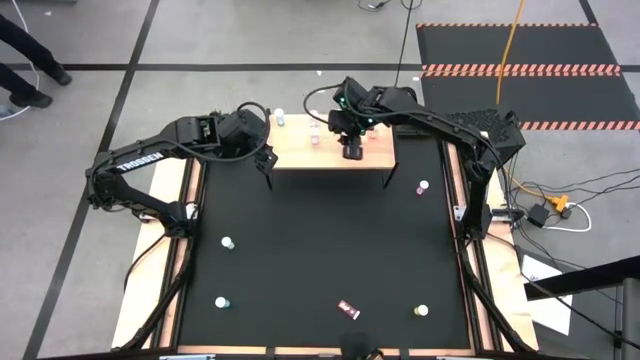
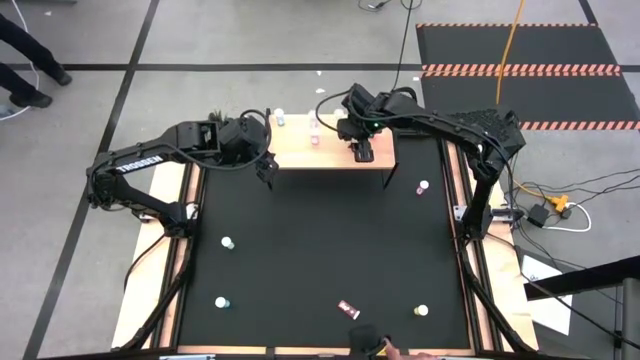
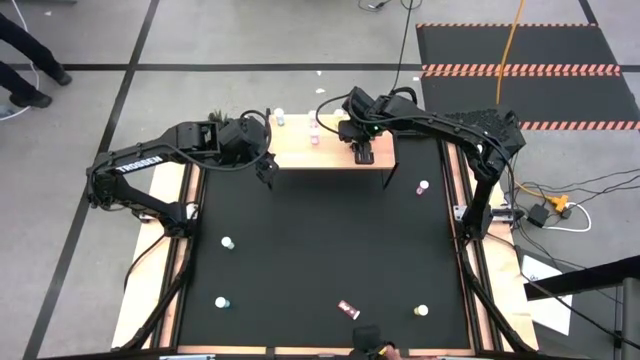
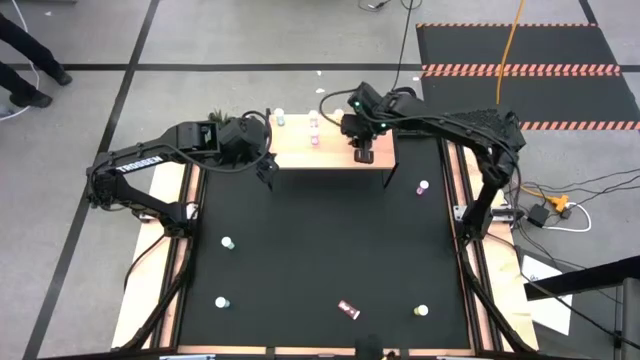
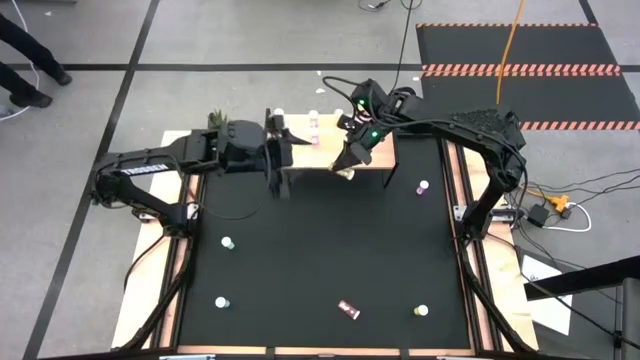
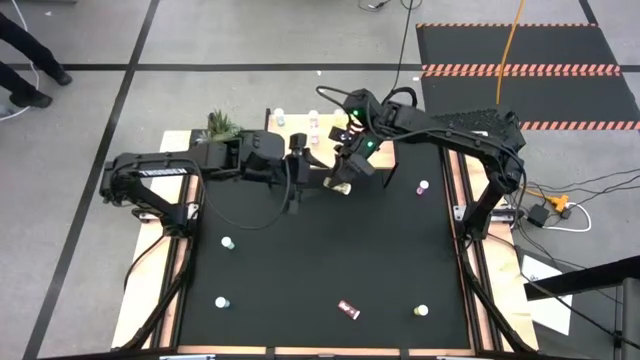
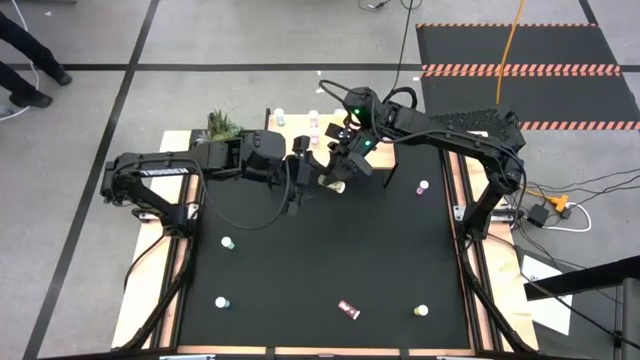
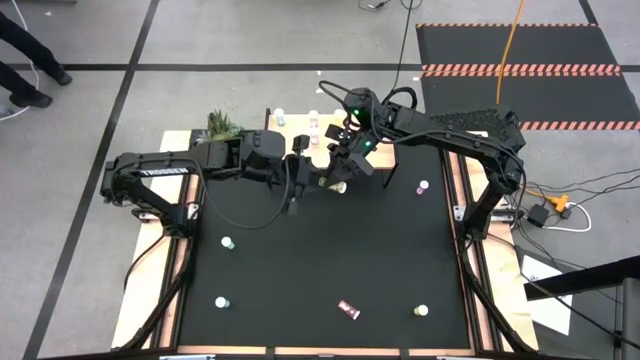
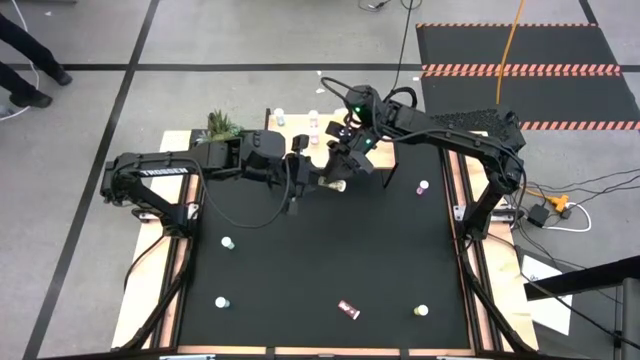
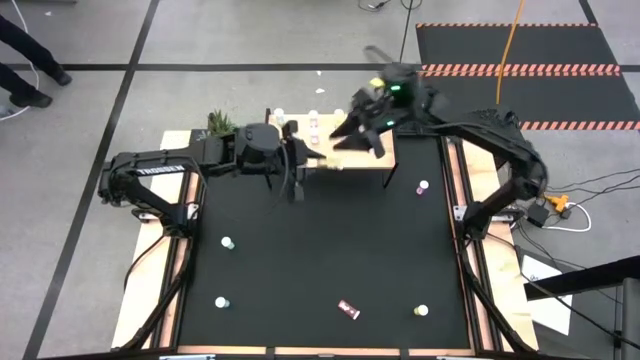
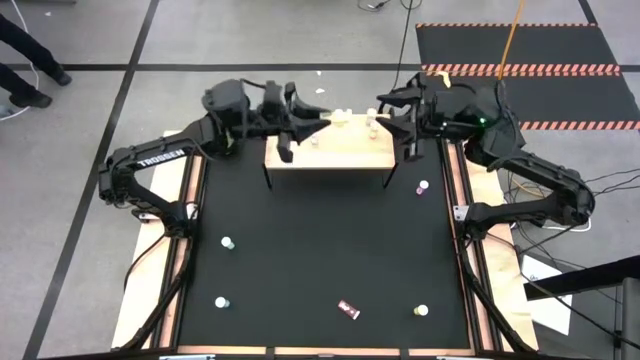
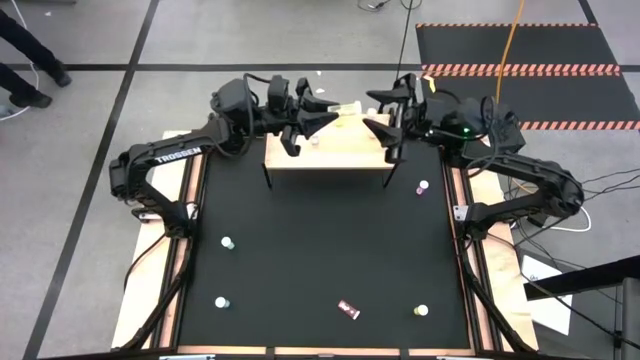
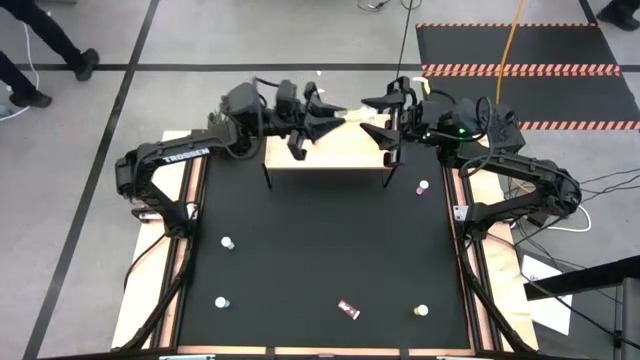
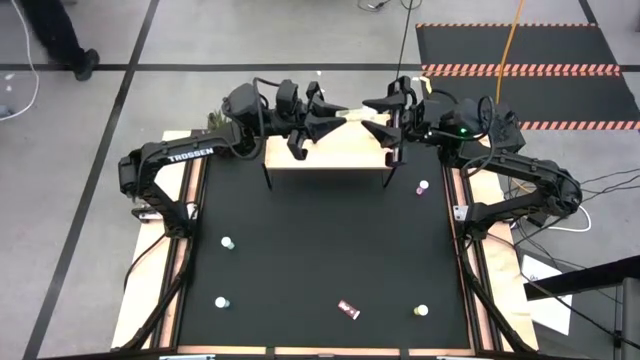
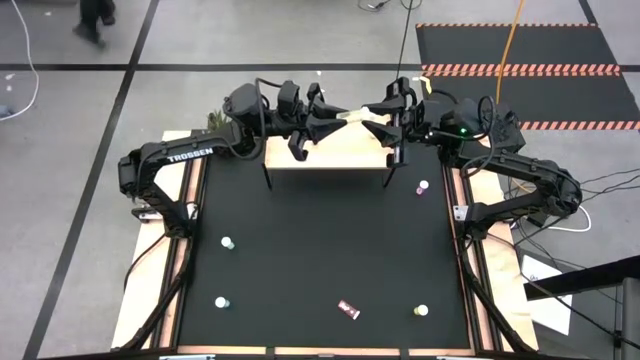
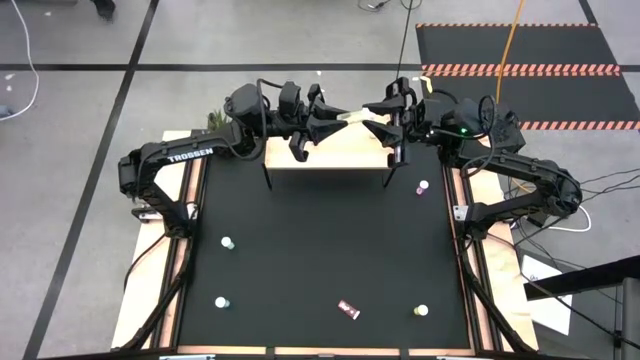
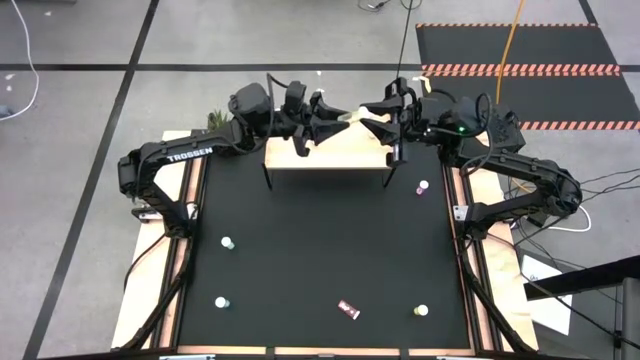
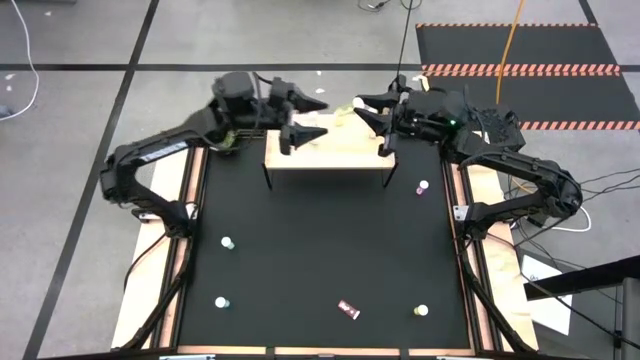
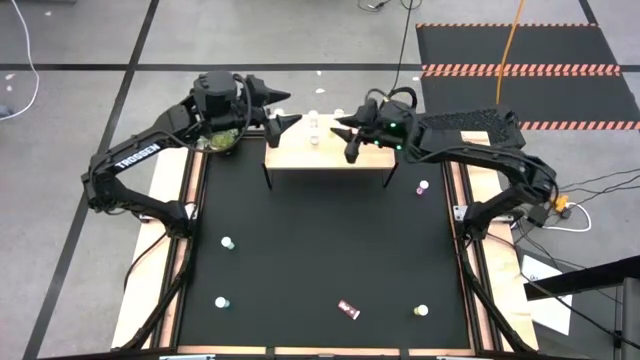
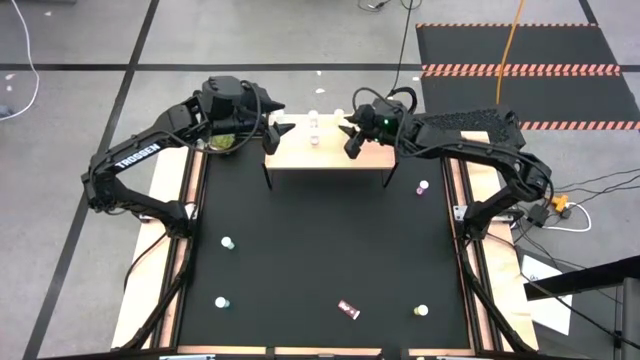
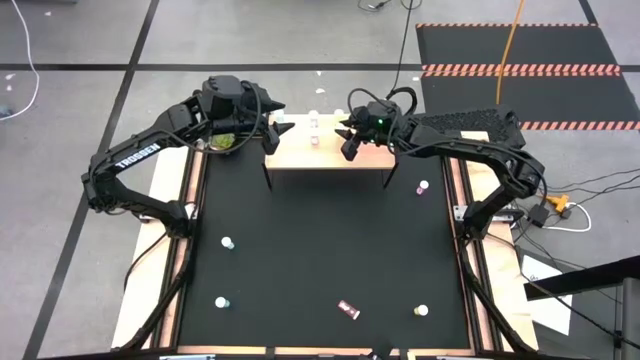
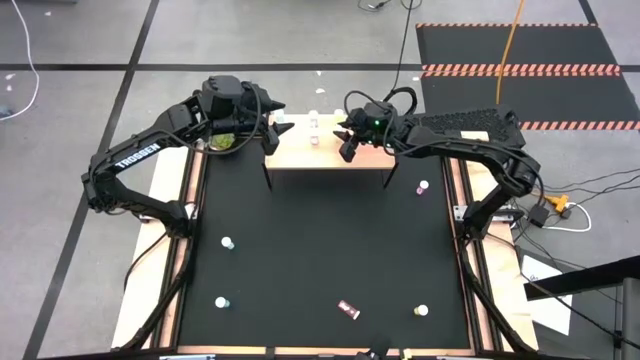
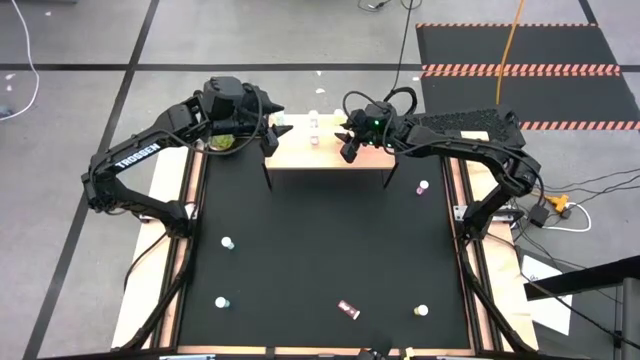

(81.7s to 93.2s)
Task: Pick and place medicine bottles onto shelf by color
Adjust the yellow pill bottle on the shelf

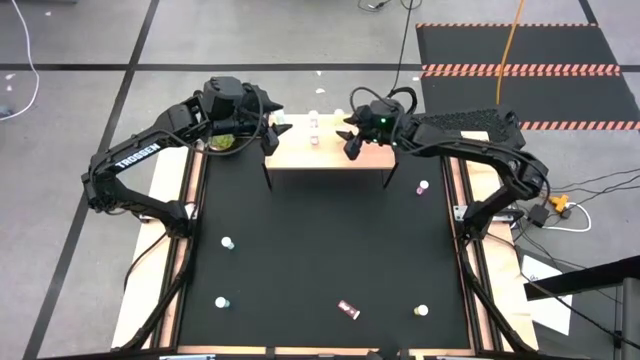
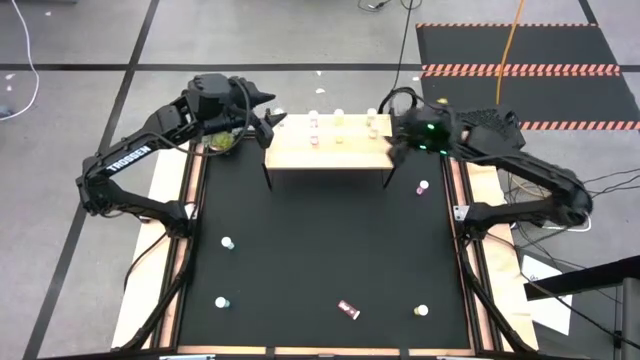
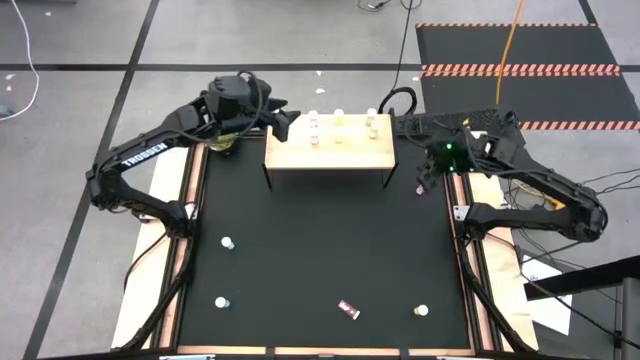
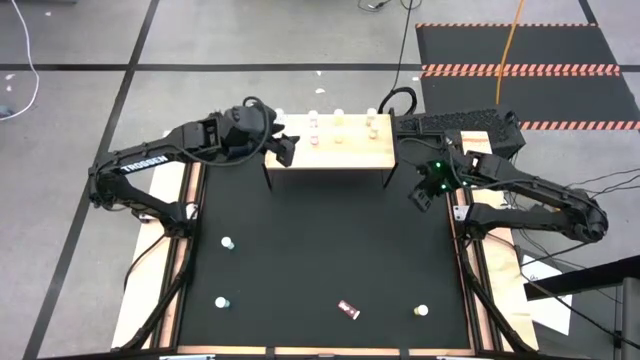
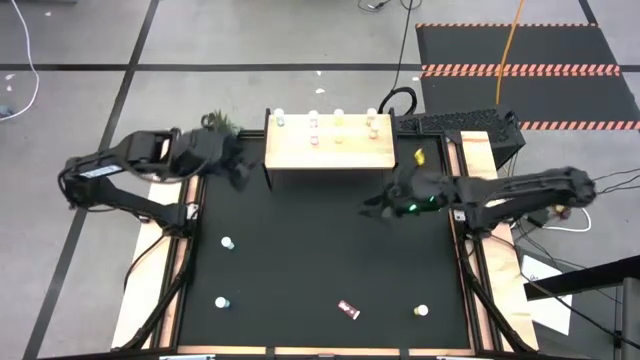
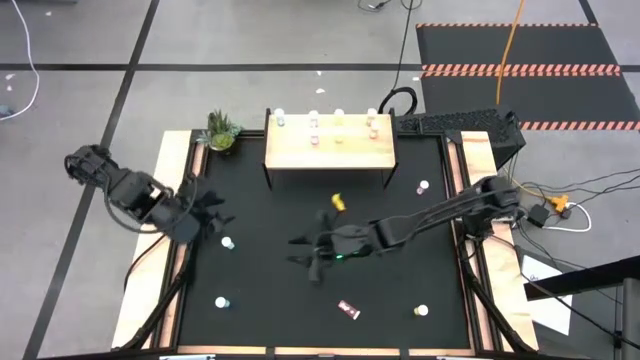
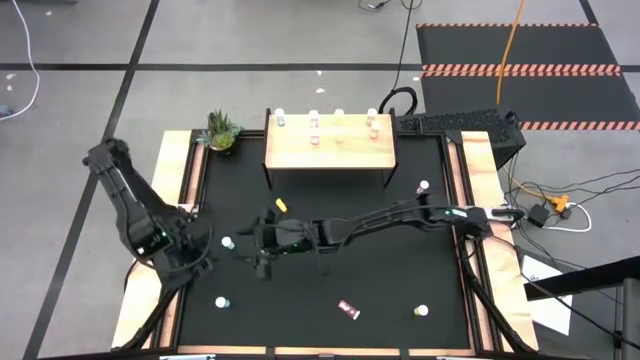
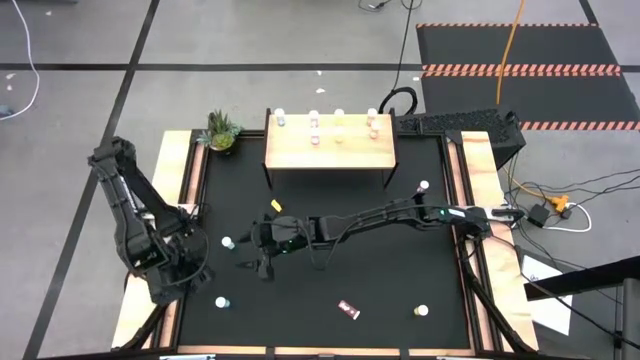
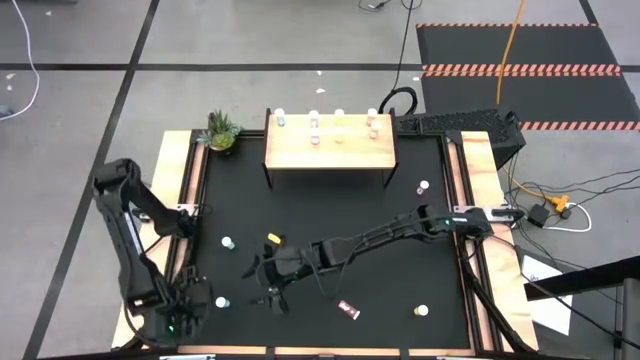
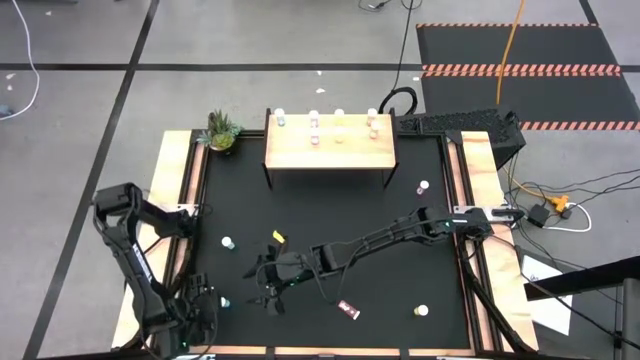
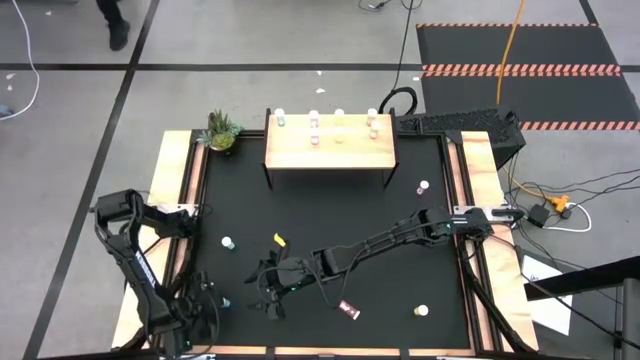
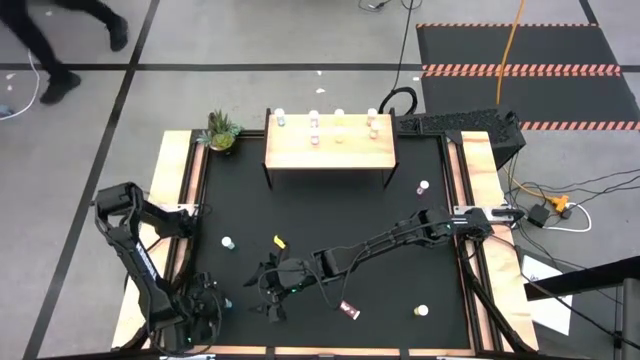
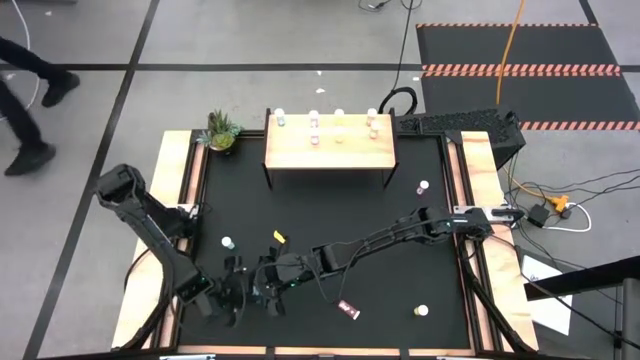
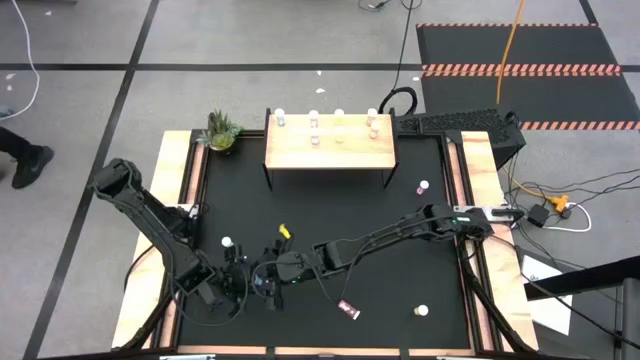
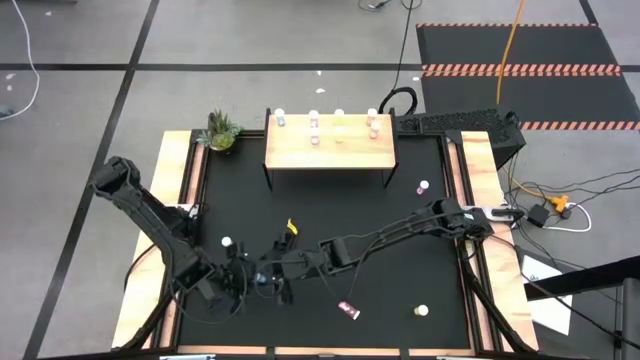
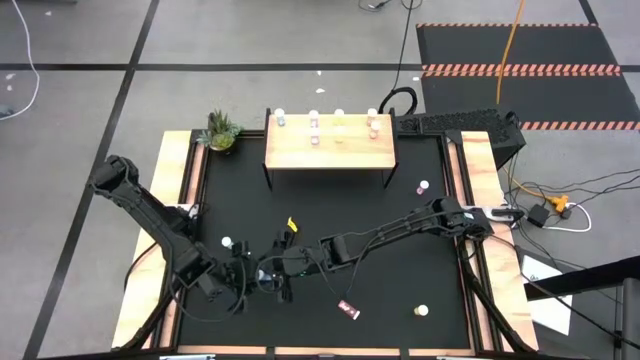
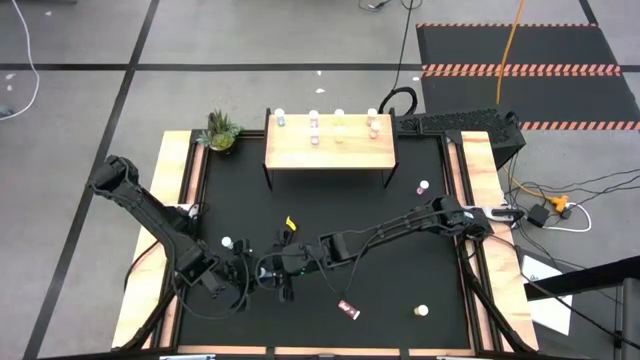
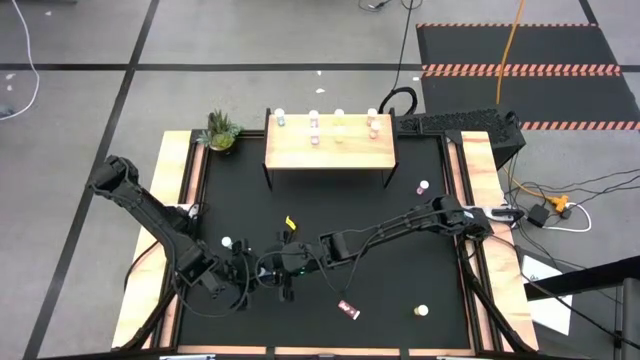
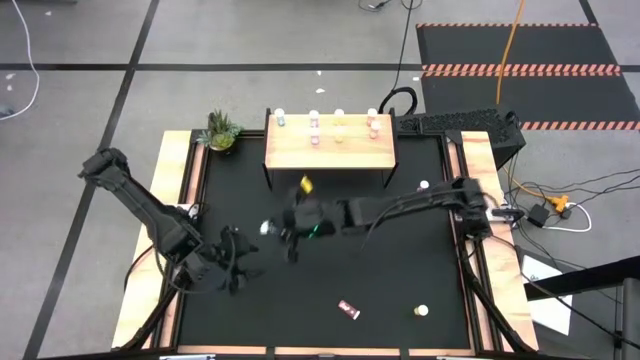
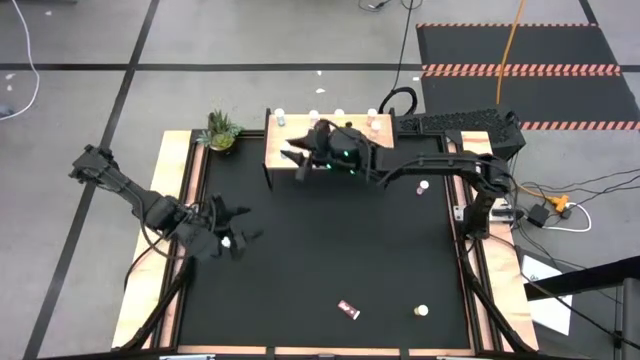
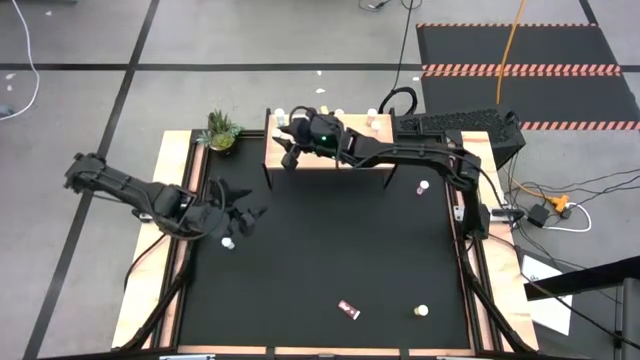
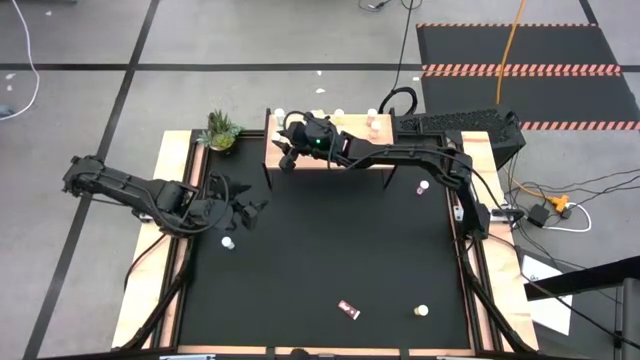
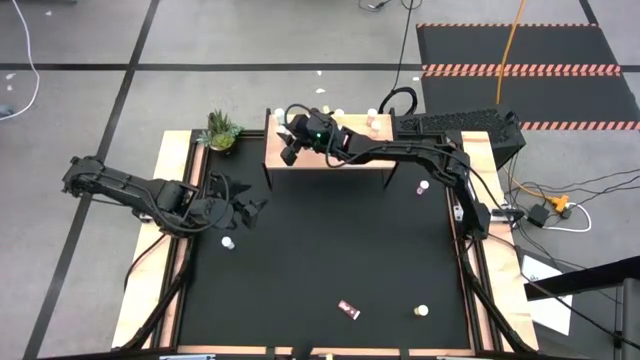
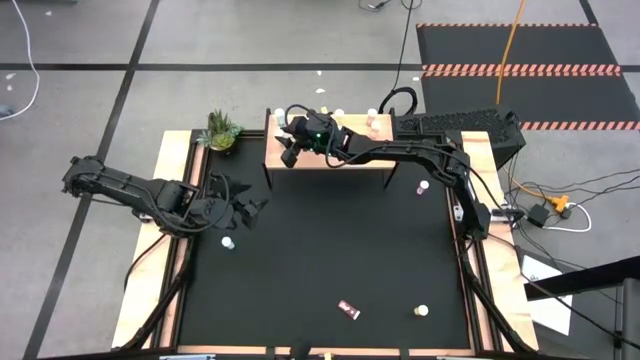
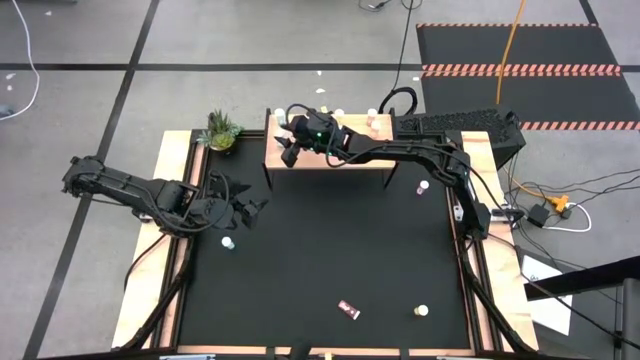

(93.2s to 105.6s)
Put the bottom blue pill bottle aligned with the other blue pill bottle on the shelf
